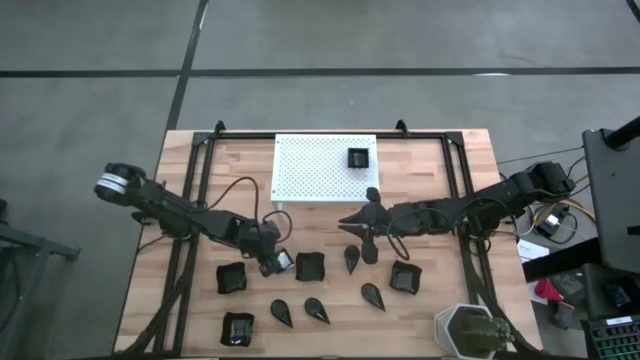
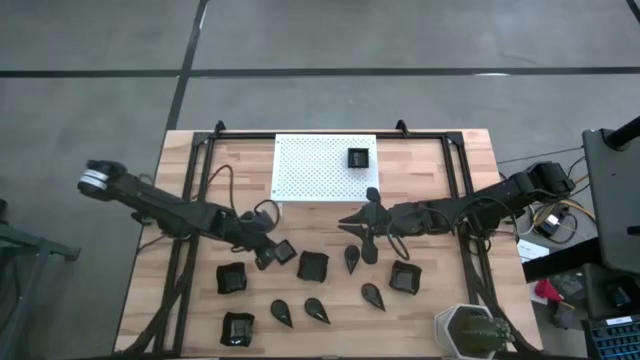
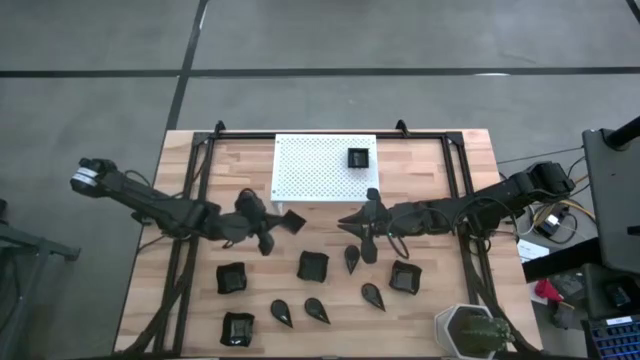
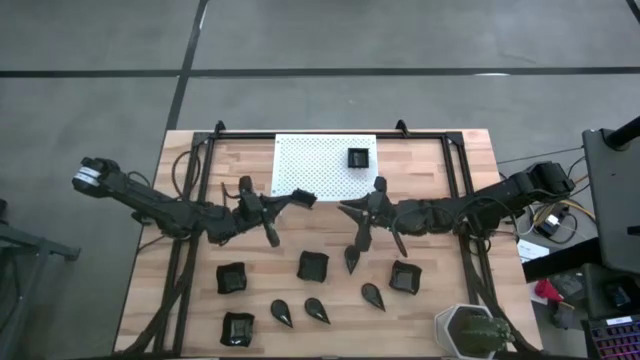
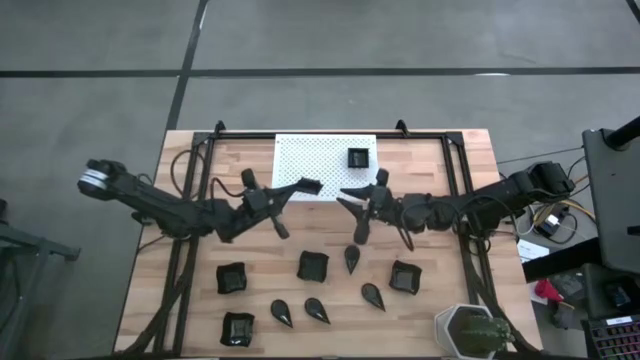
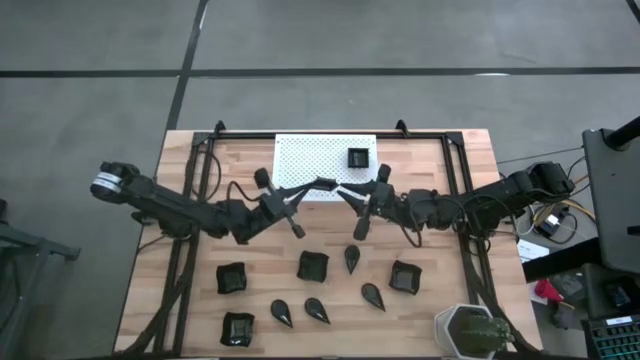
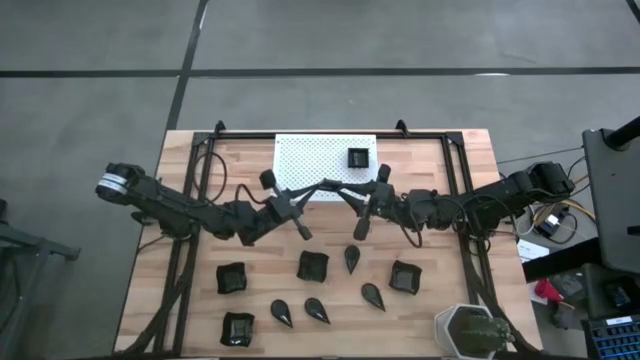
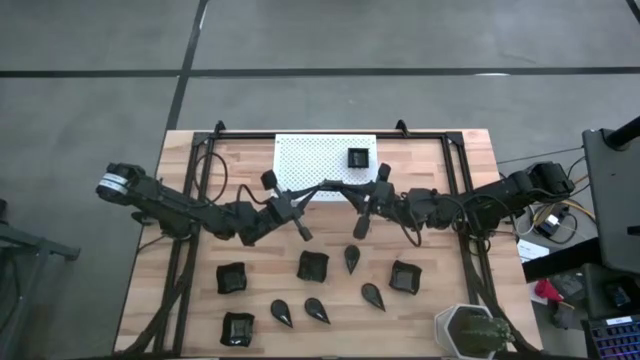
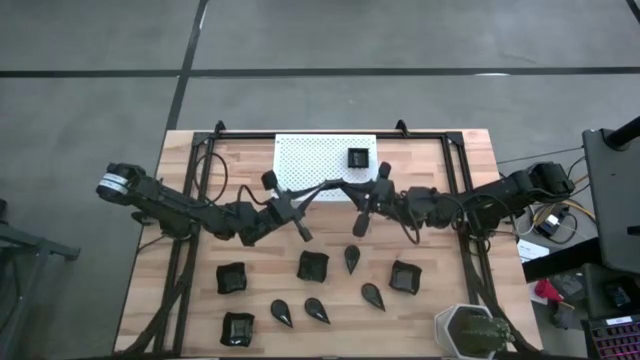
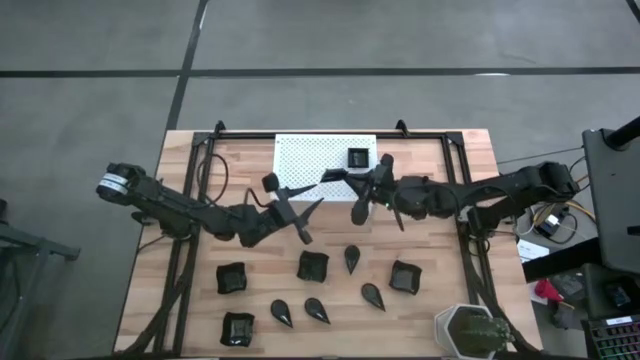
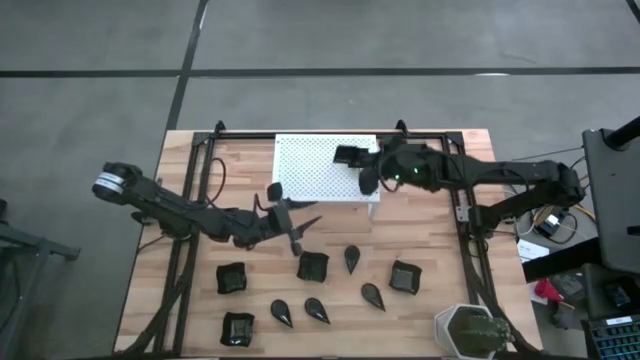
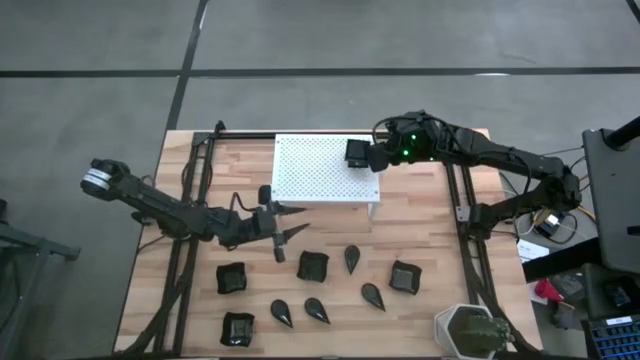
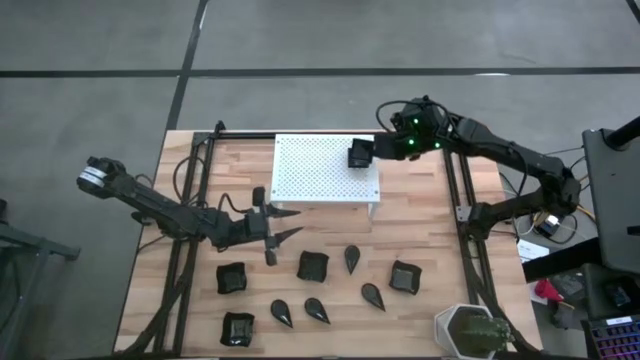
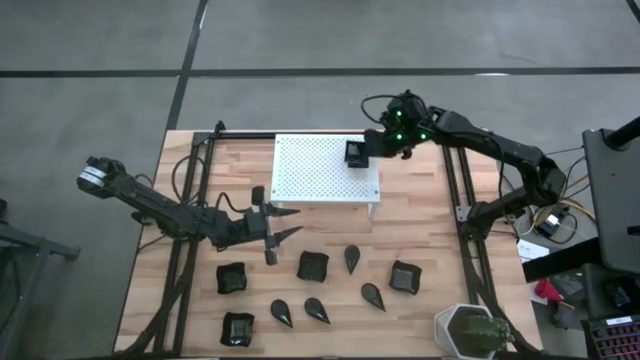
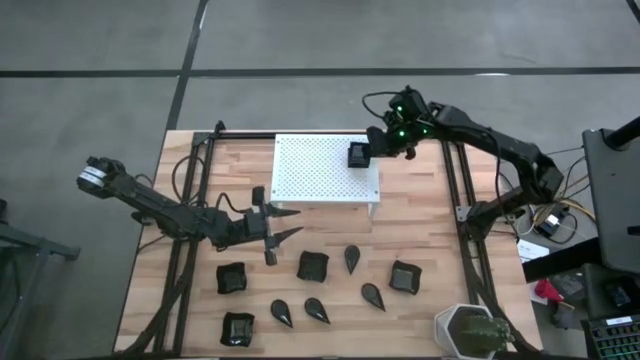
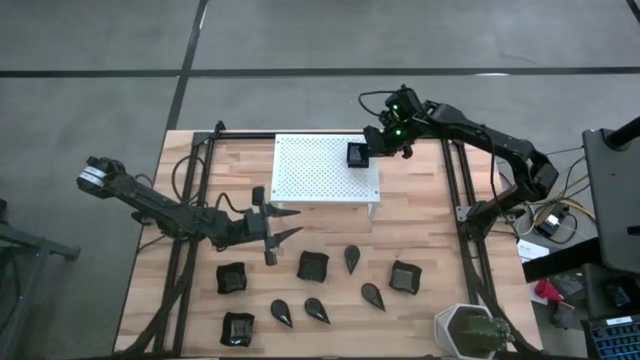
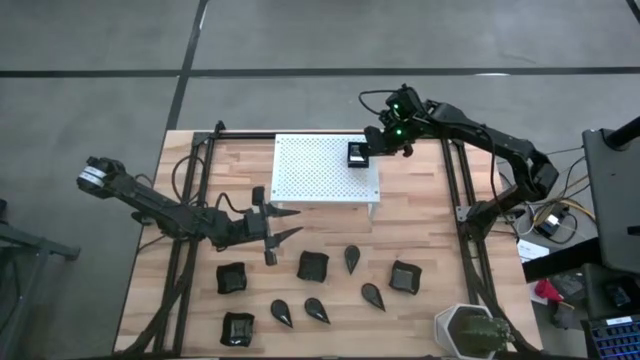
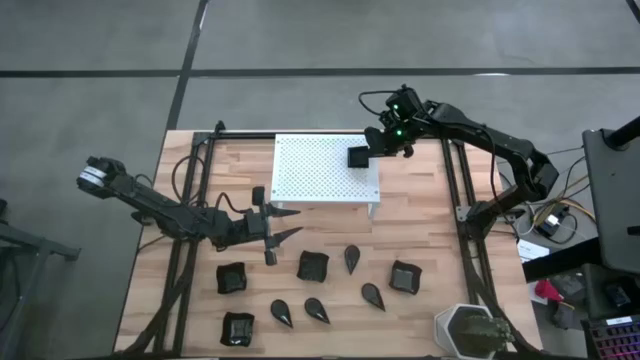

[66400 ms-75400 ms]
Task: Pick & Place Mini shaped plates
Stack the square plate on top of the square plate on the shelf

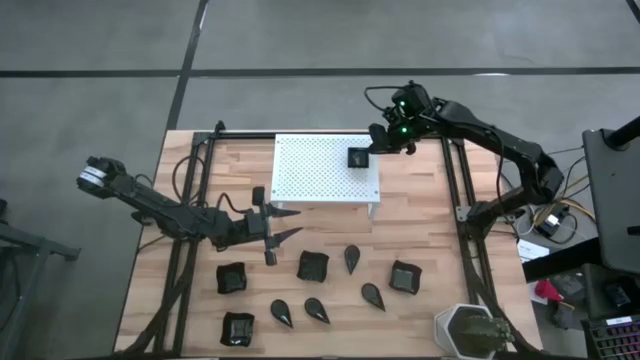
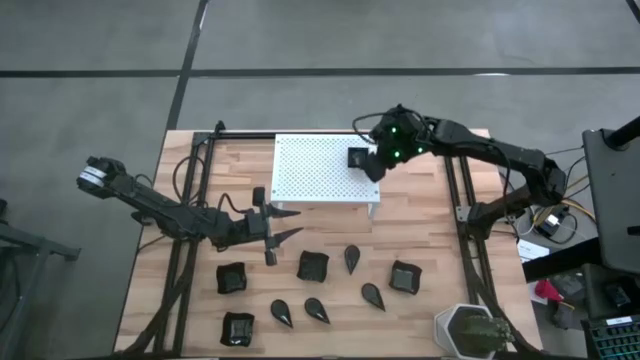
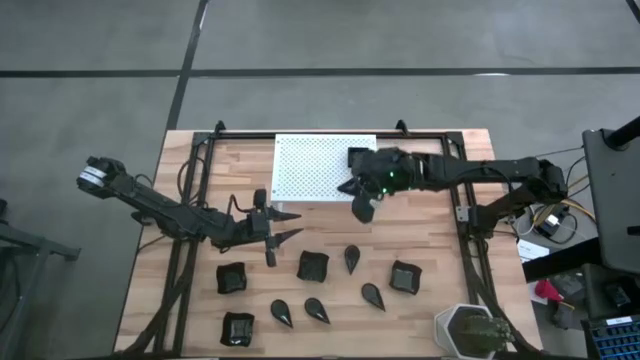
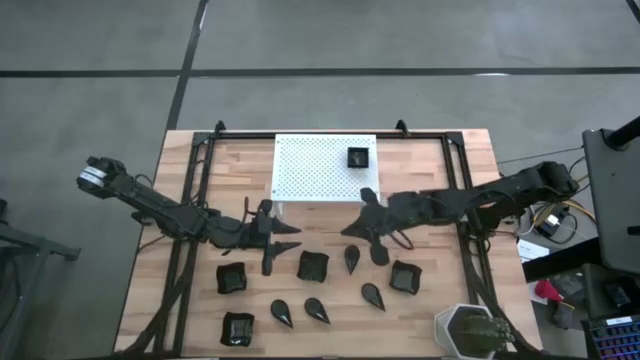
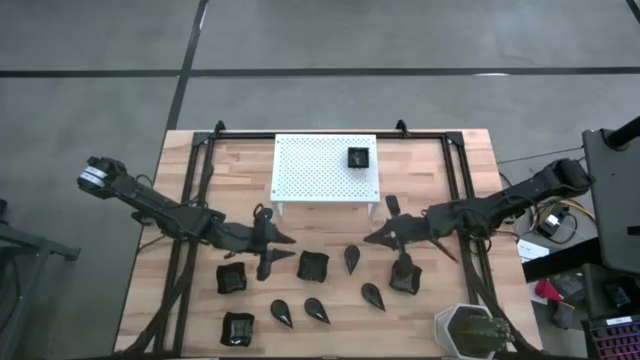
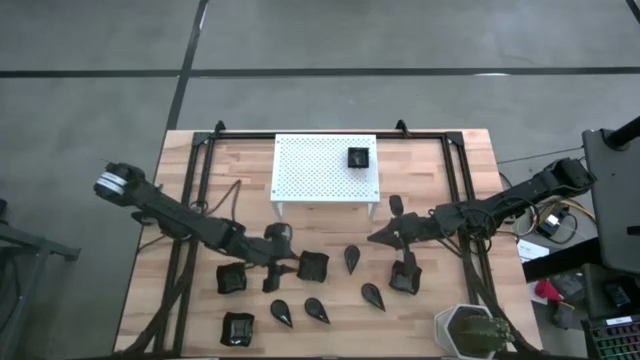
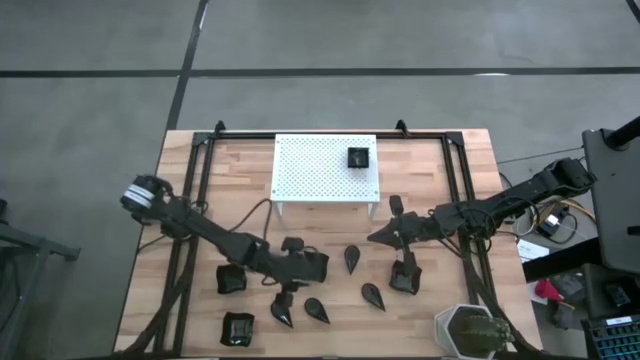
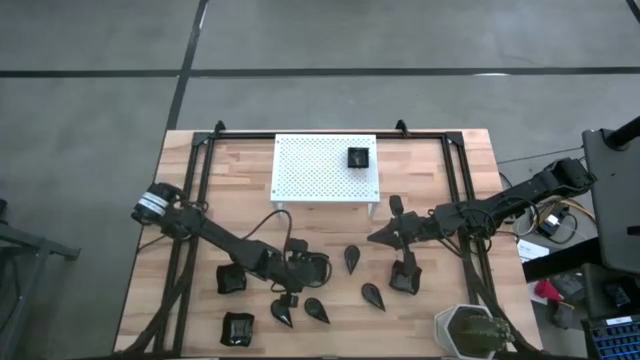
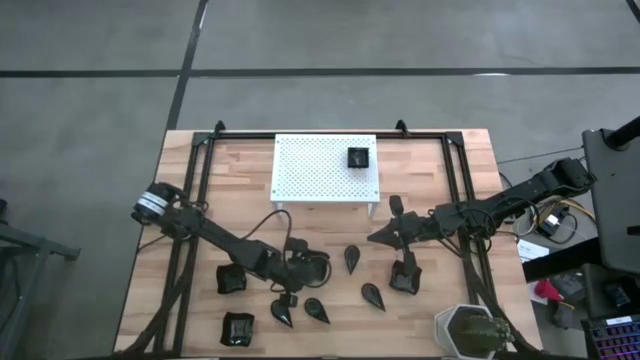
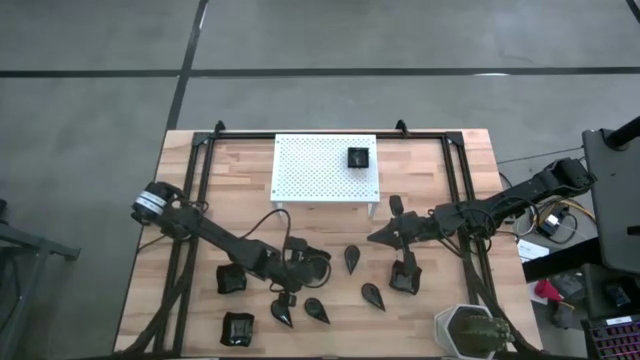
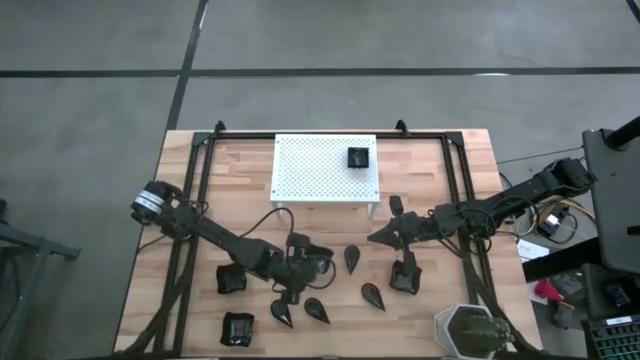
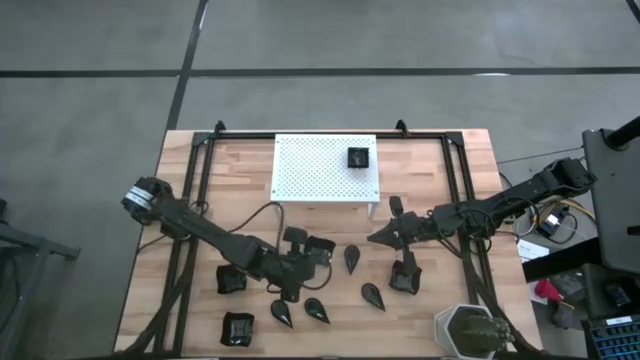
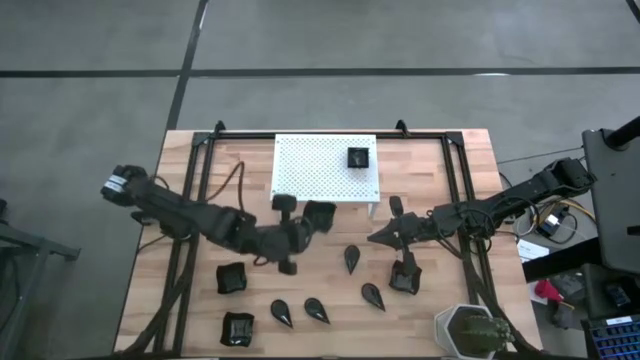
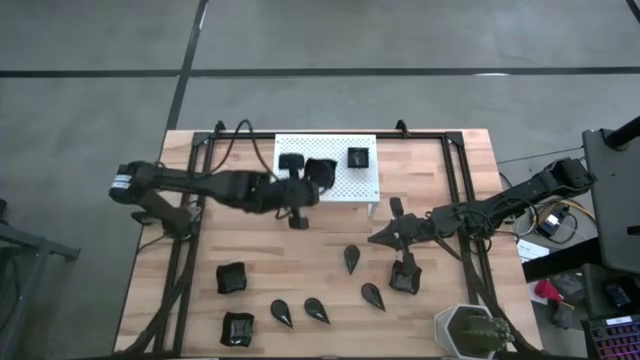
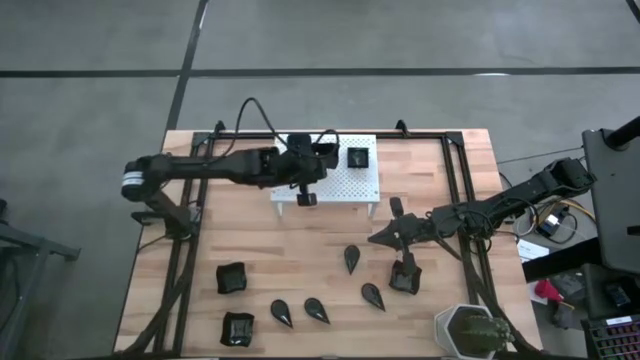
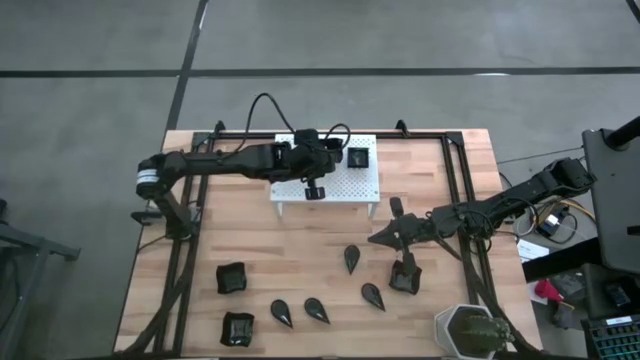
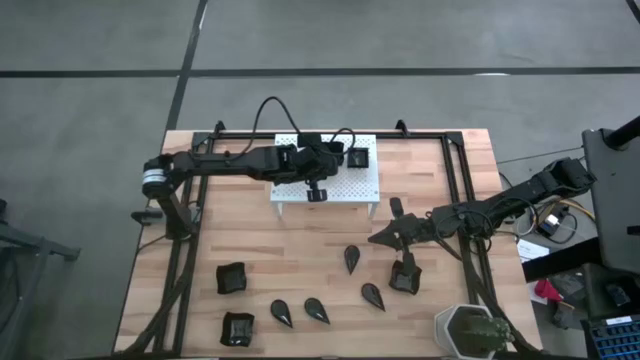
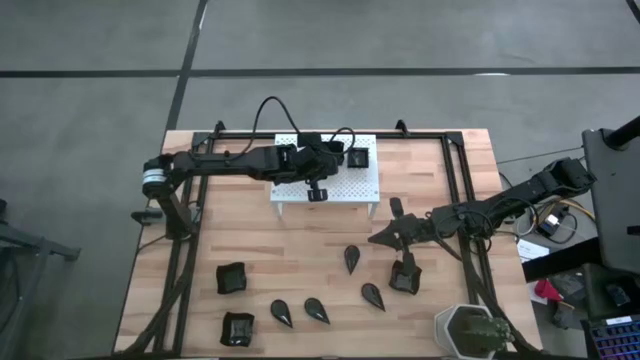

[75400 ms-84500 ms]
Put the distorted square plate on the shelf

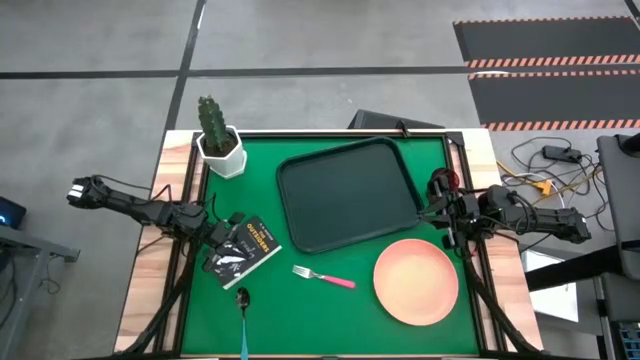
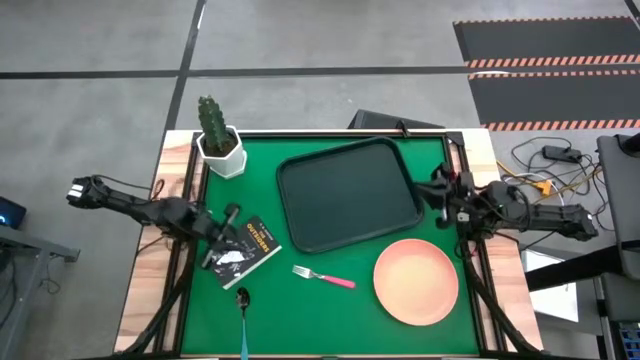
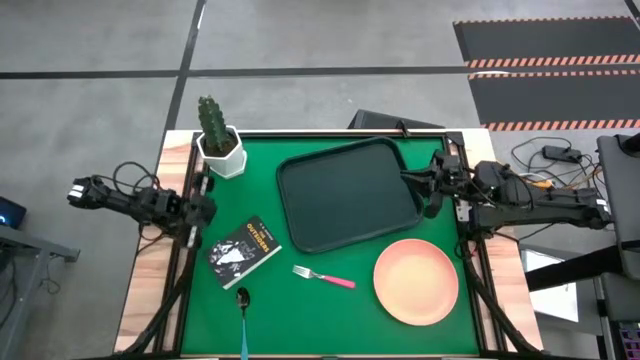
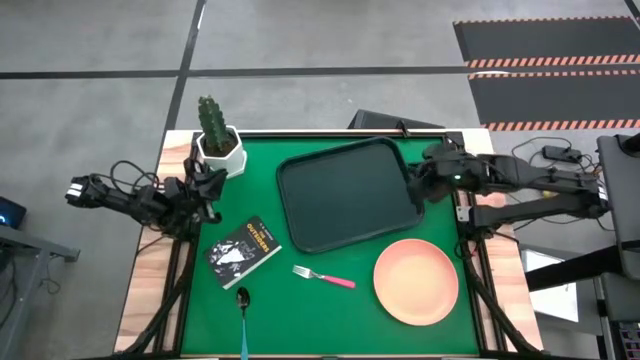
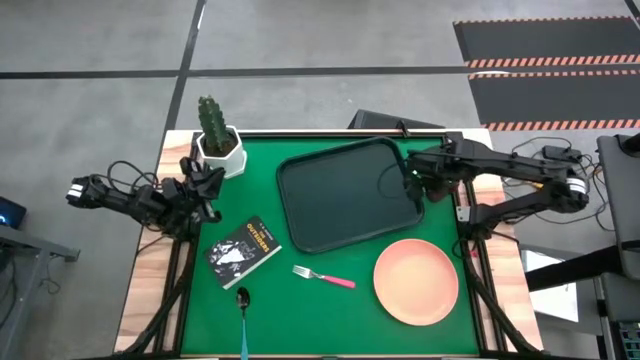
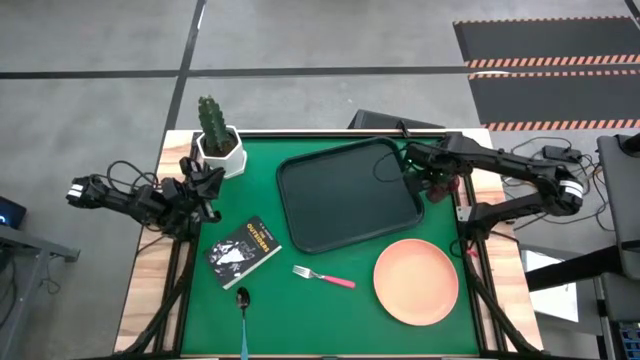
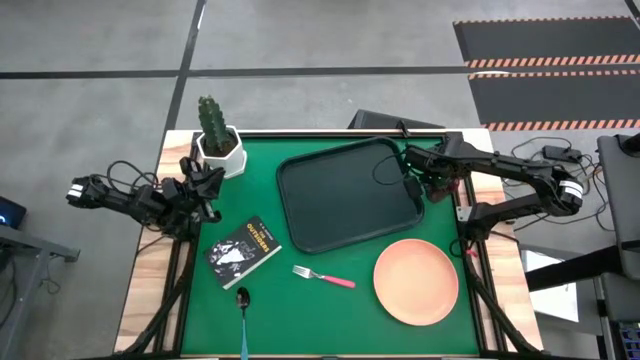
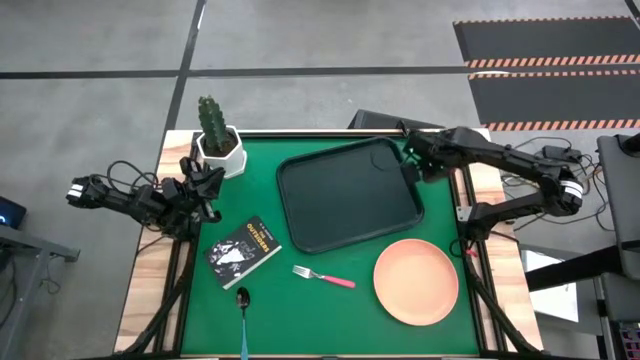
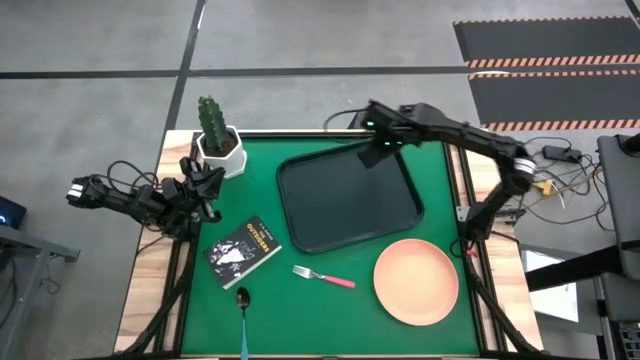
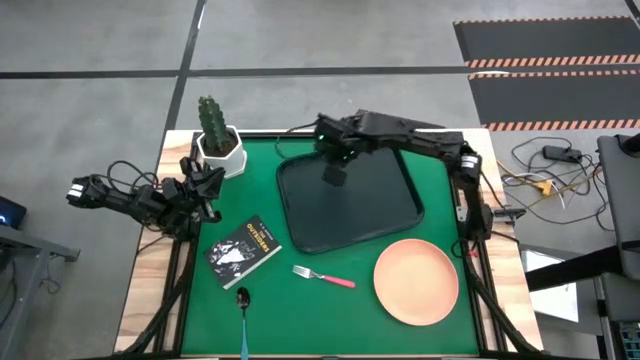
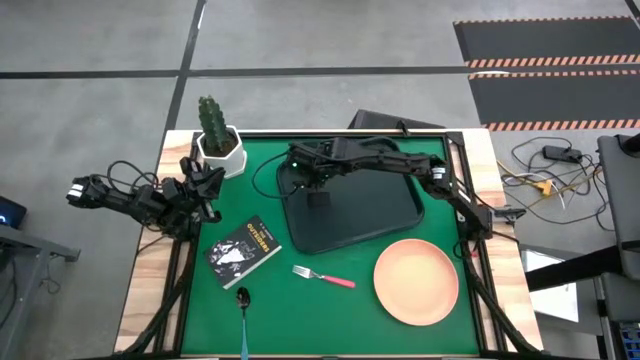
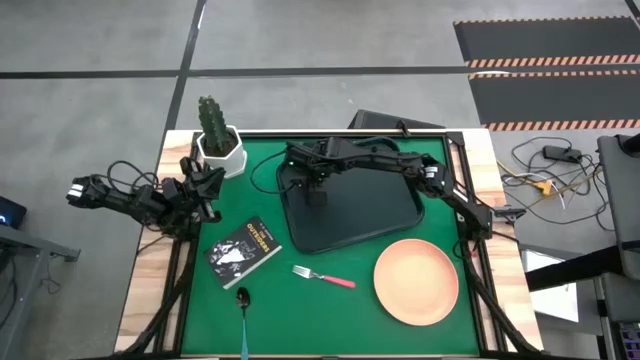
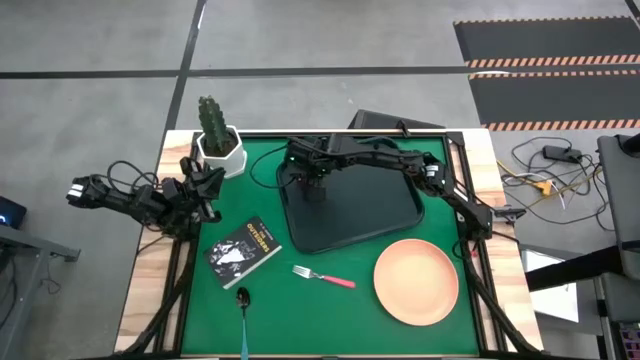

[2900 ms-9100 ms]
Task: Pick and place plate/cup/fork/spoon on tray
Put the red cup on the black serving tray
